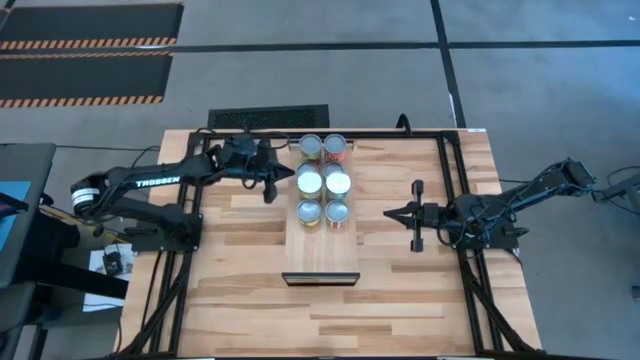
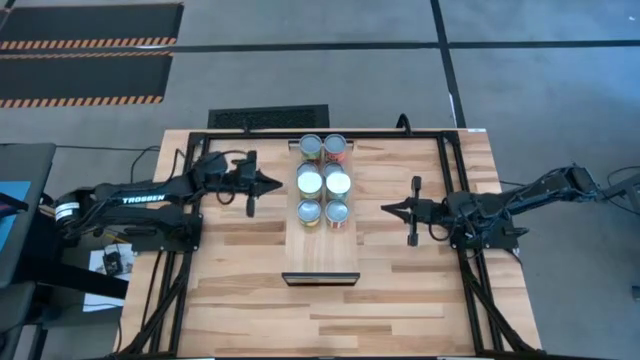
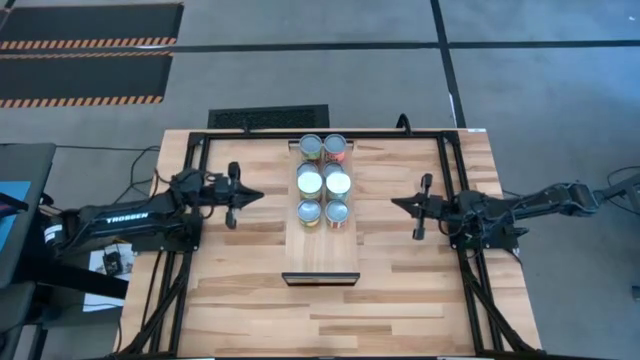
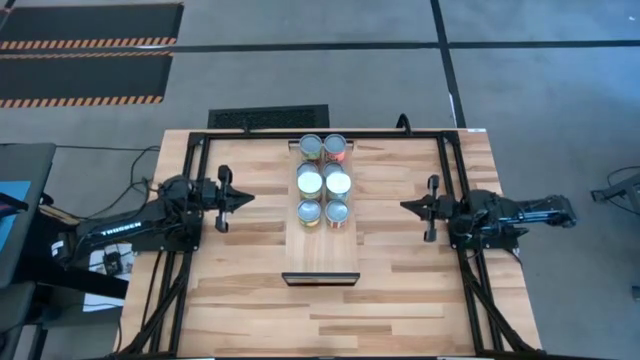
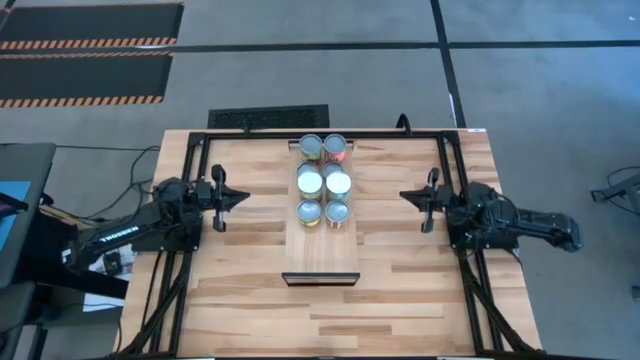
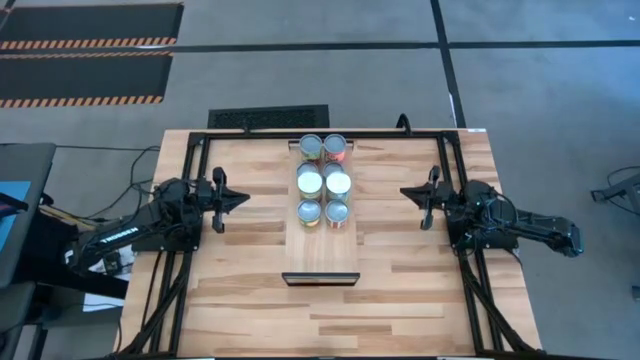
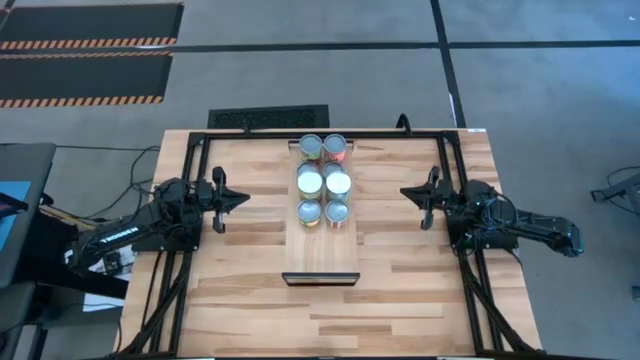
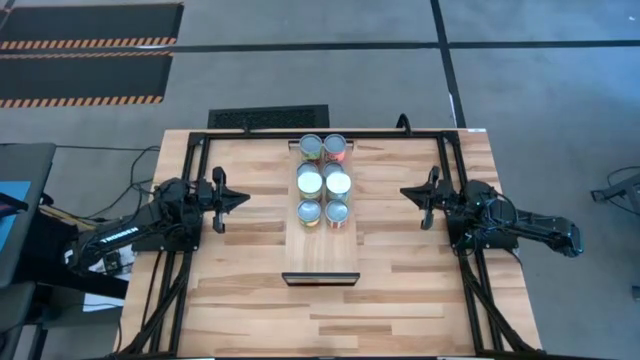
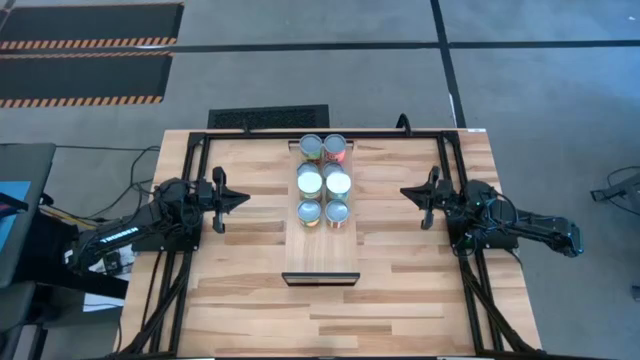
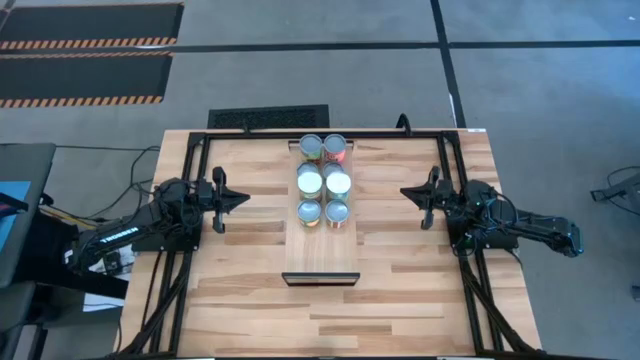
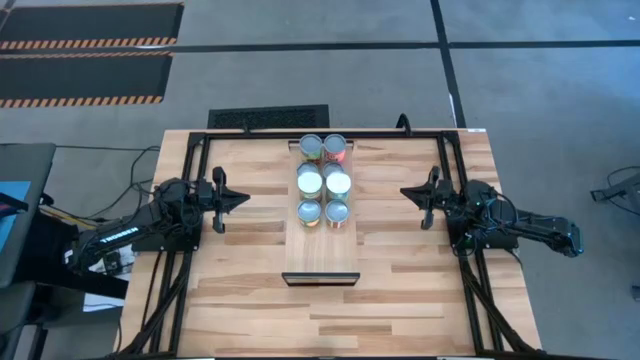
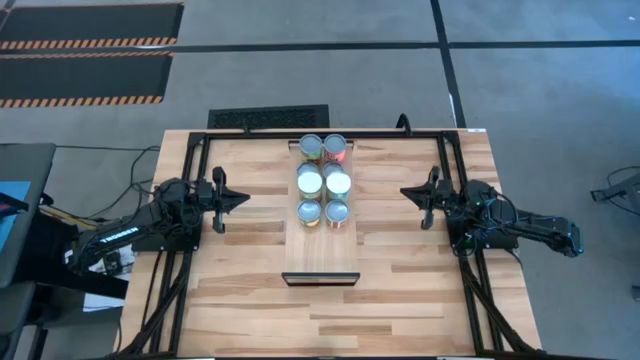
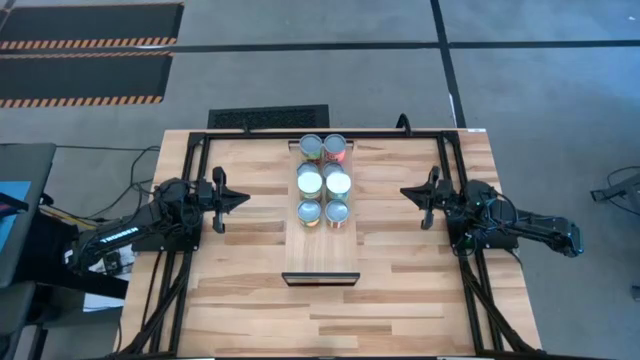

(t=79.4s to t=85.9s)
Task: Pick and place cans onto a shelf
Return to Home Position

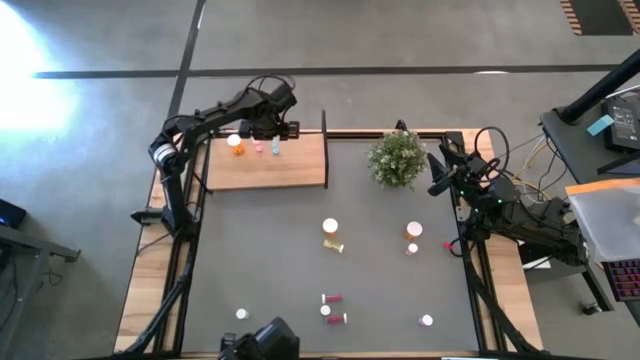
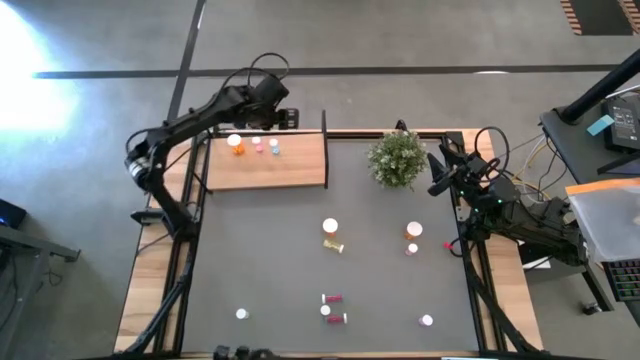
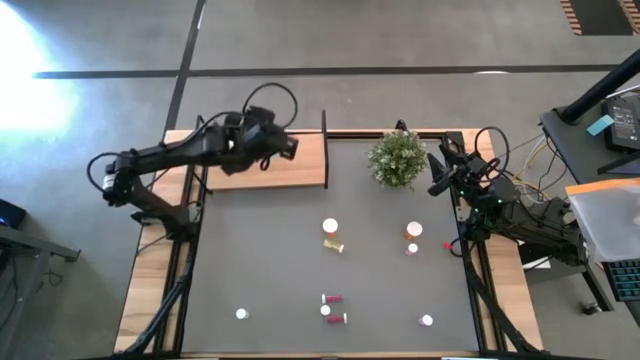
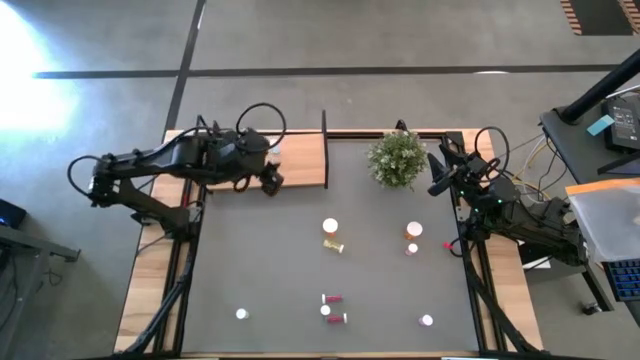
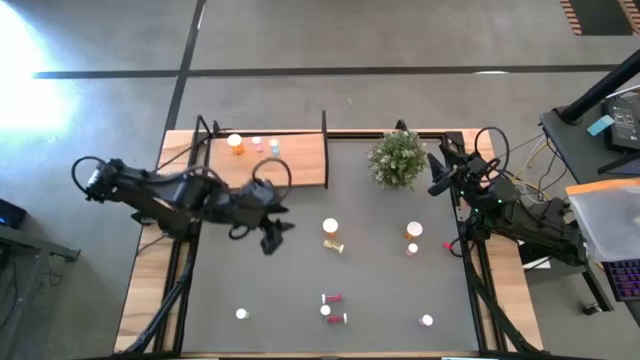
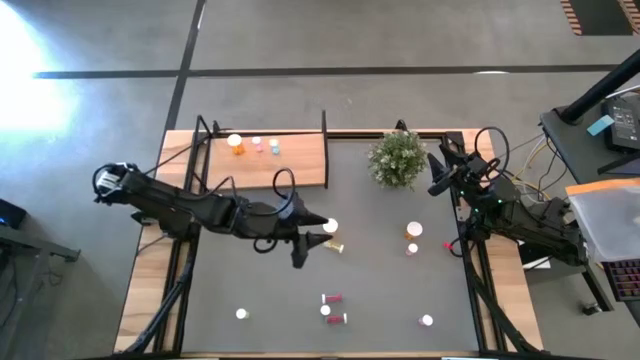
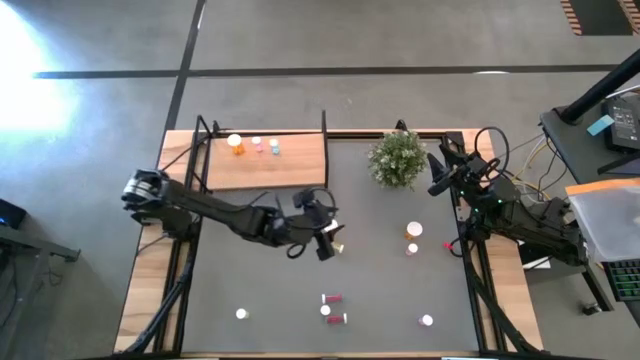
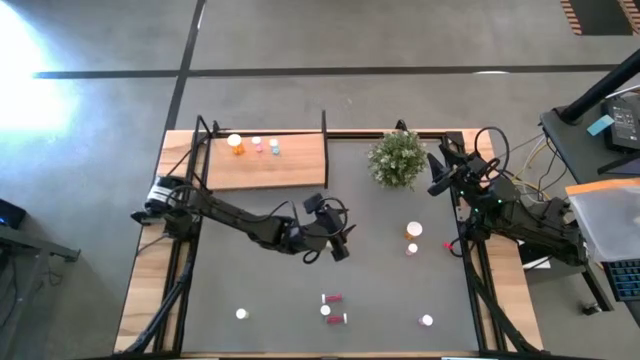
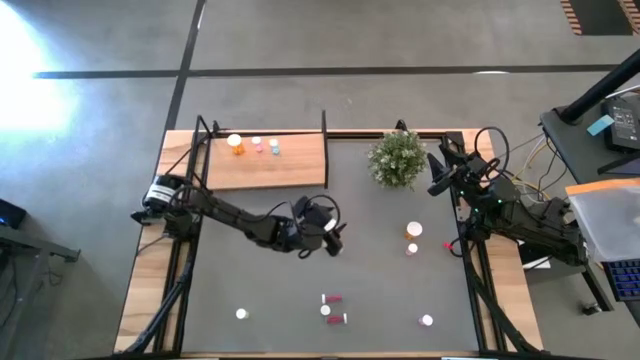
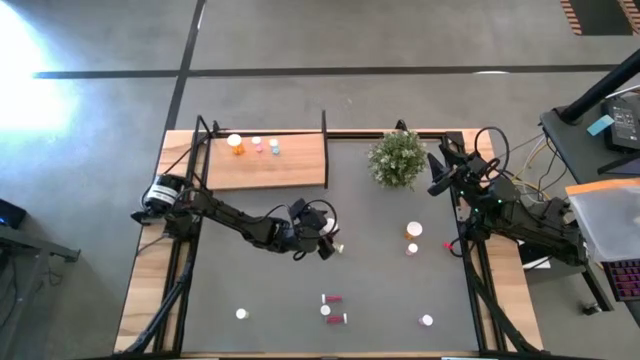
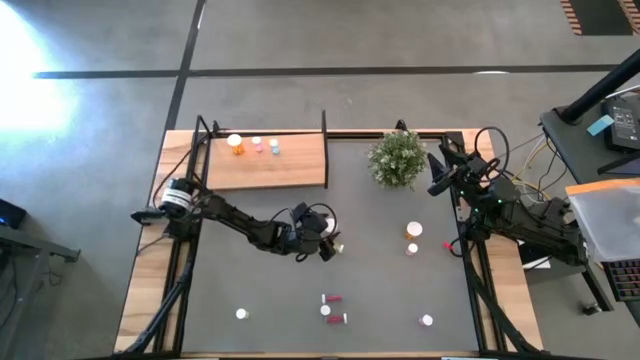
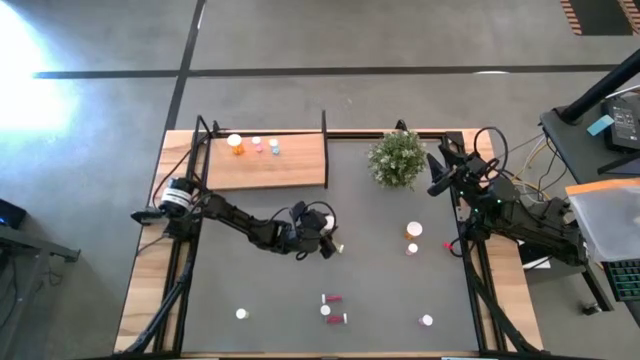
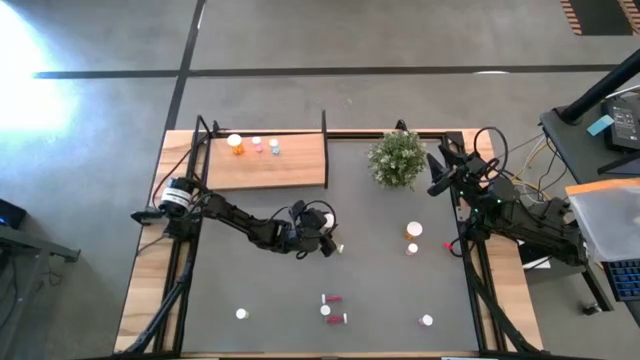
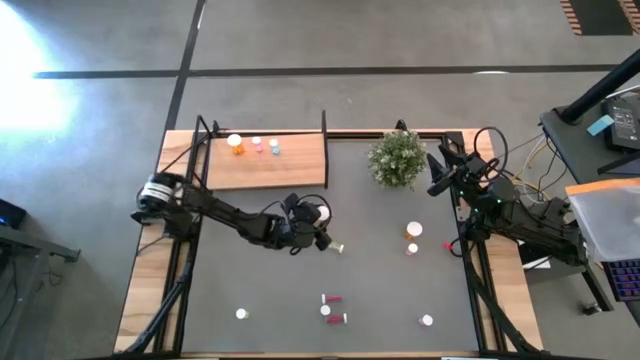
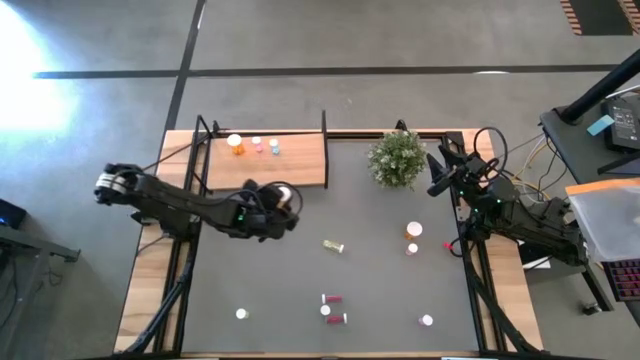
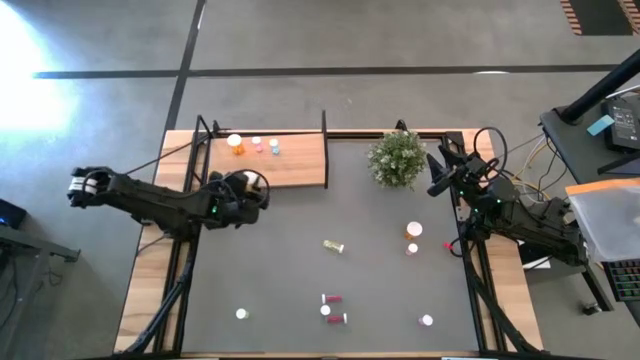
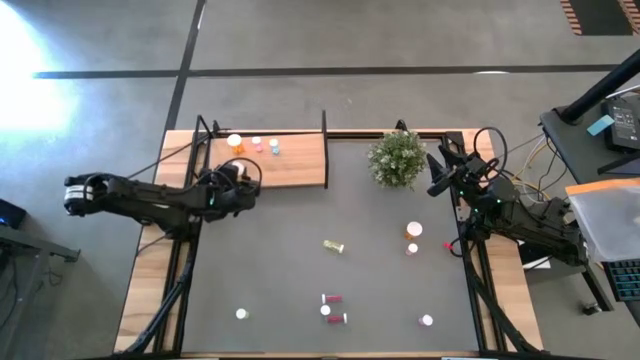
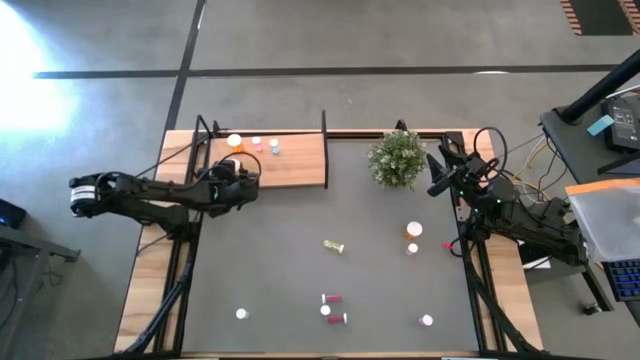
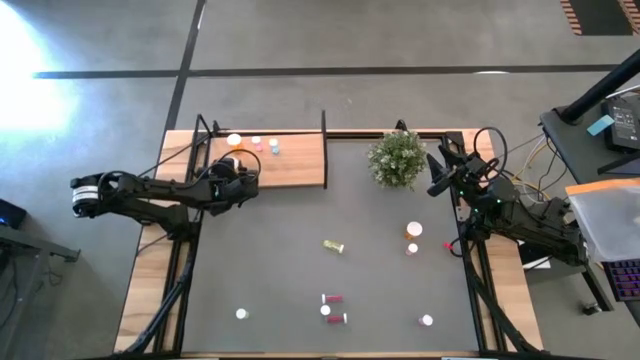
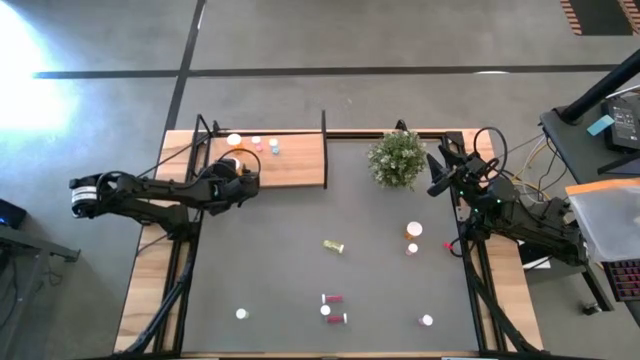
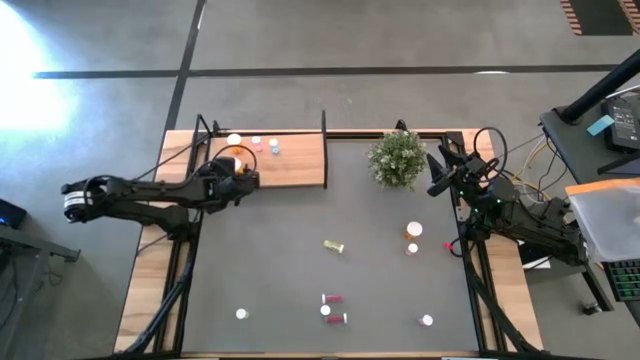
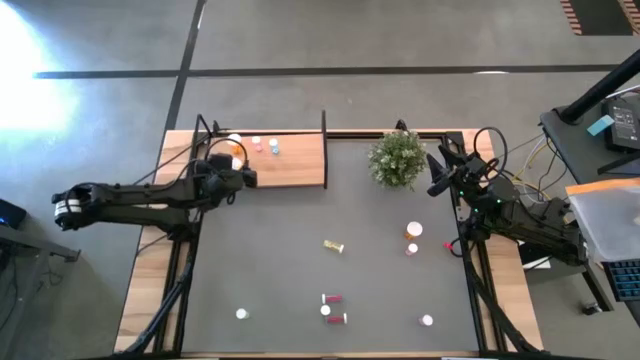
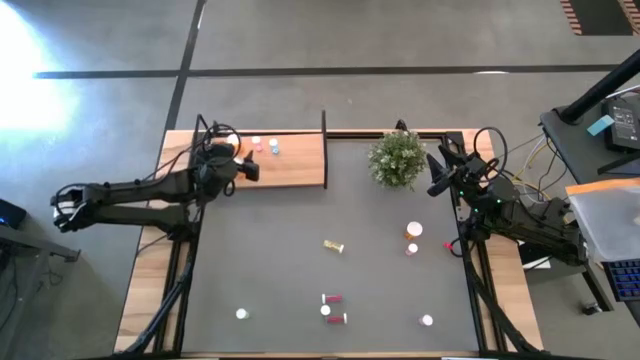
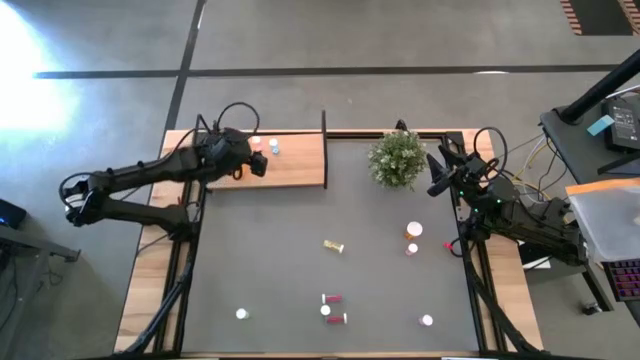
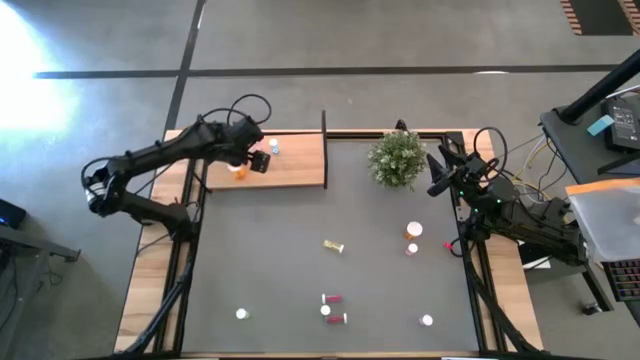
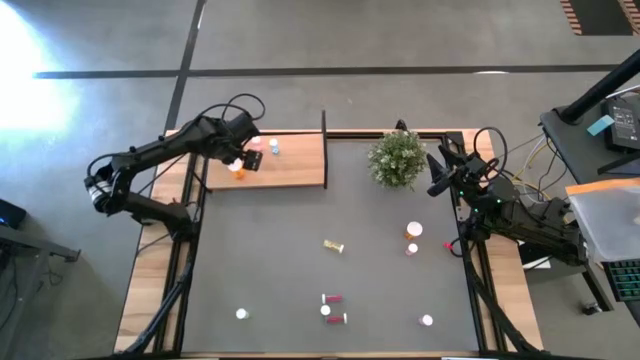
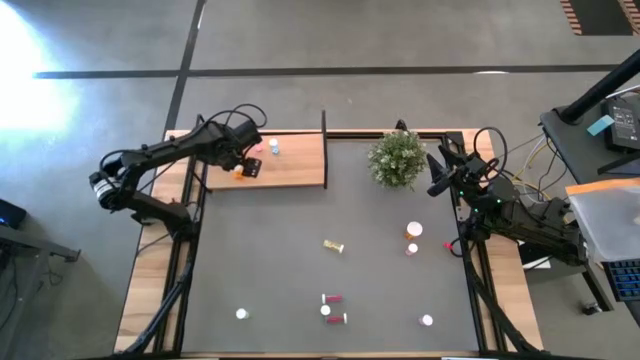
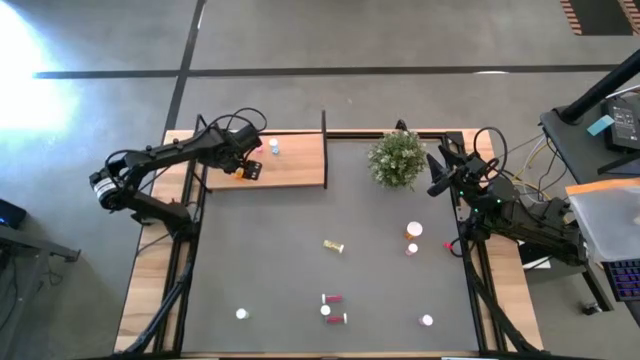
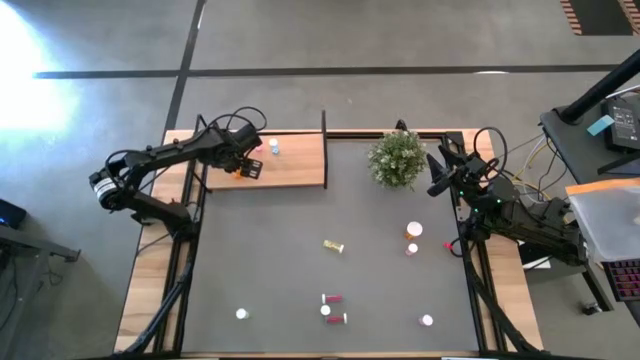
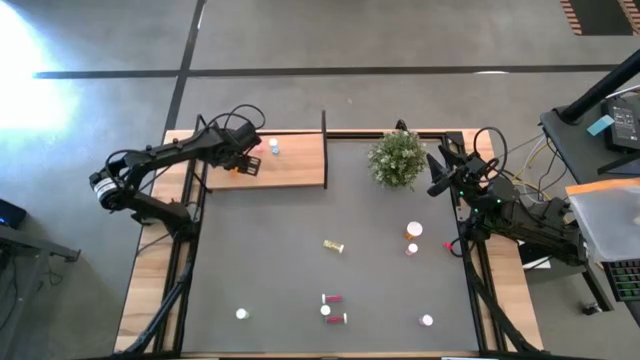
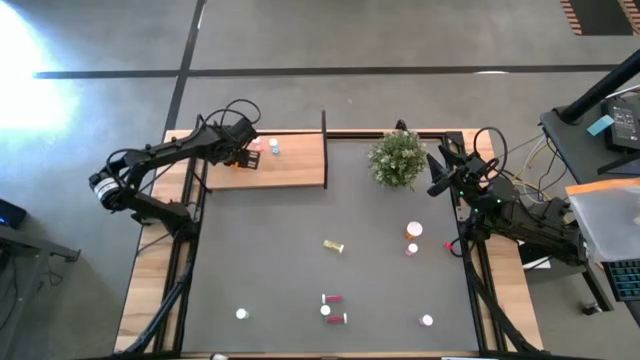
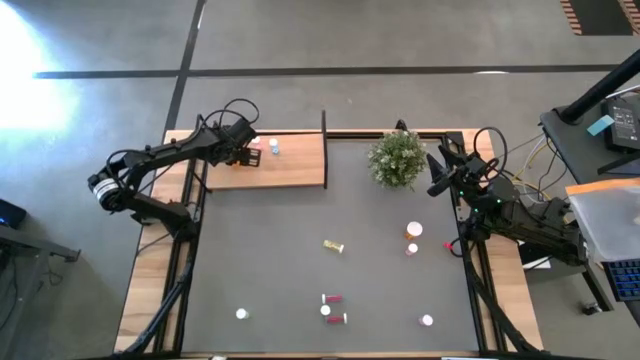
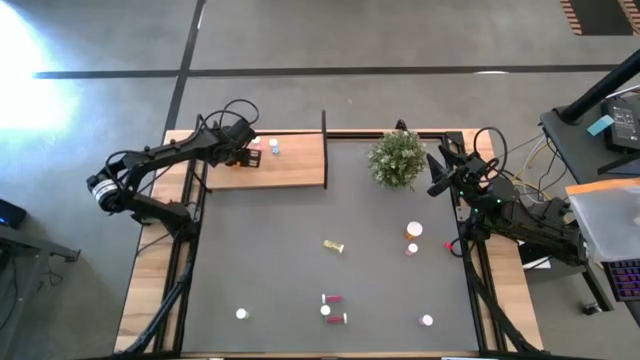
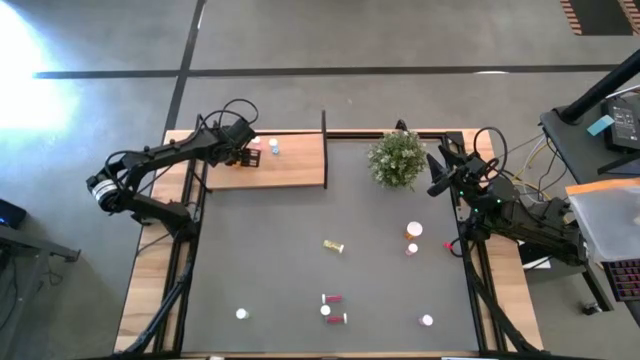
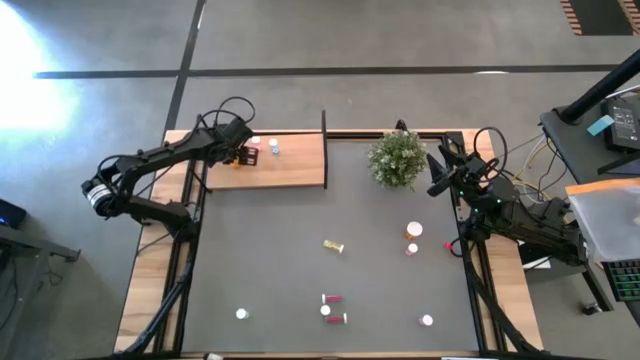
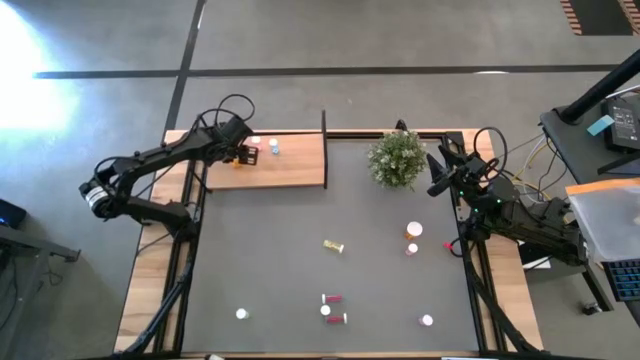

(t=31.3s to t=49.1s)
Task: Pick and place medicine bottles onto shelf by color
Put the left large orange pill bottle on the shelf aligned with the other large orange pill bottle
